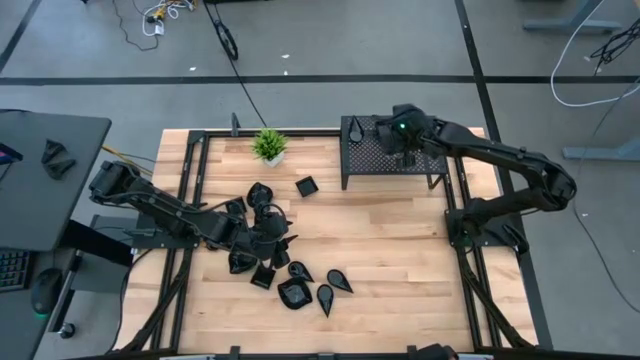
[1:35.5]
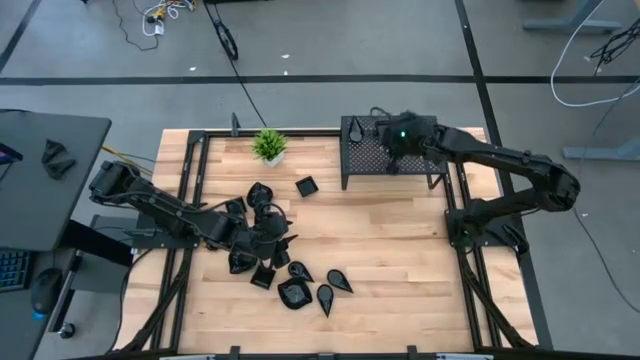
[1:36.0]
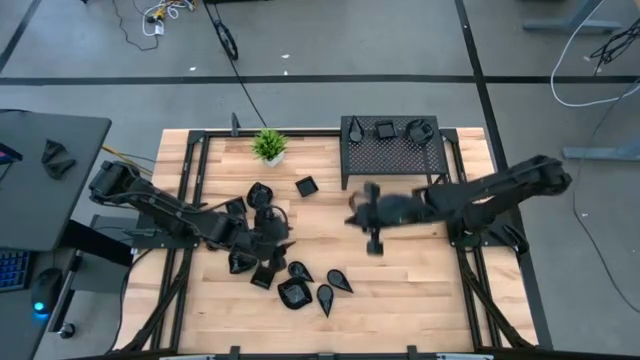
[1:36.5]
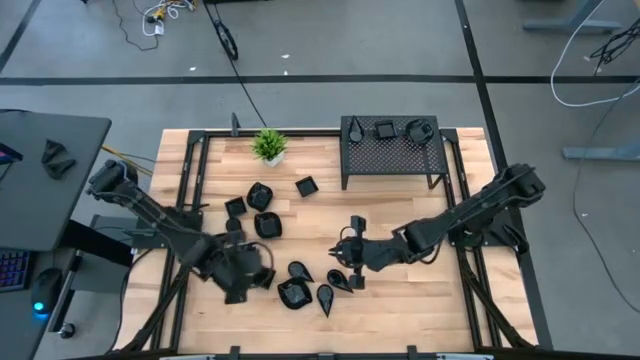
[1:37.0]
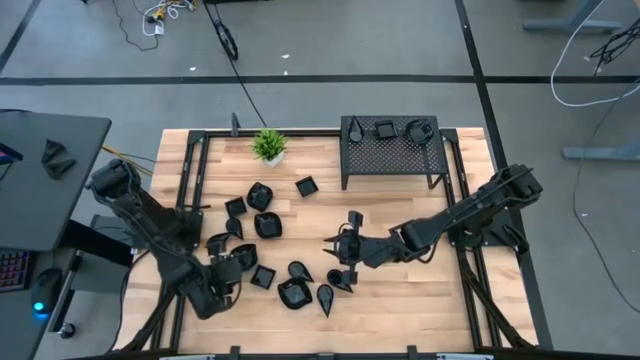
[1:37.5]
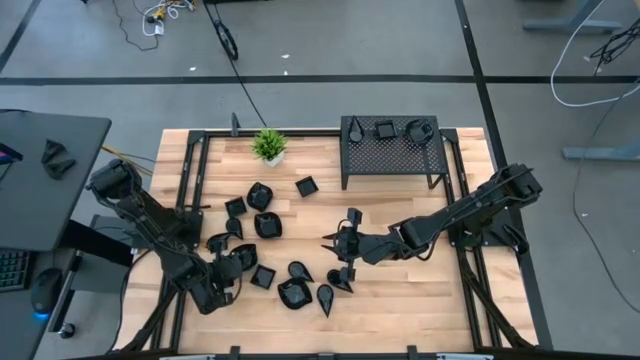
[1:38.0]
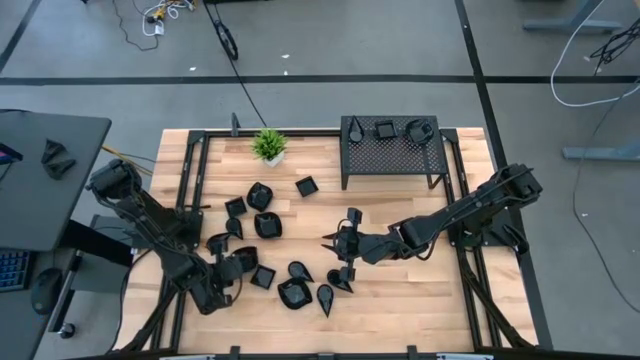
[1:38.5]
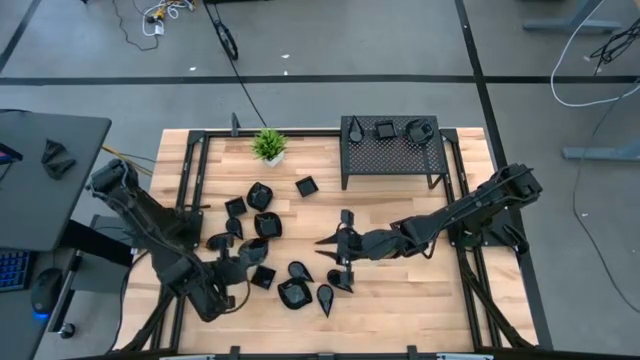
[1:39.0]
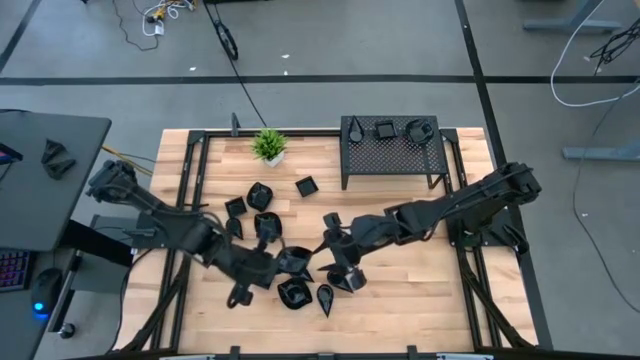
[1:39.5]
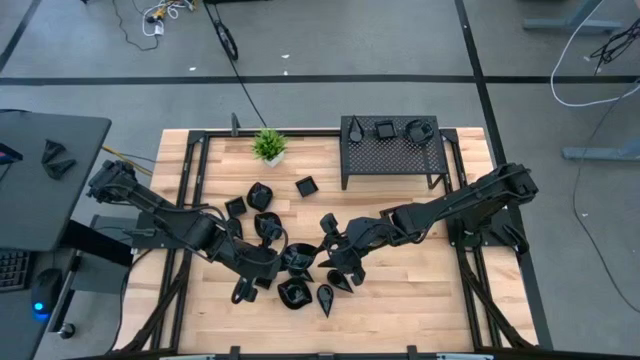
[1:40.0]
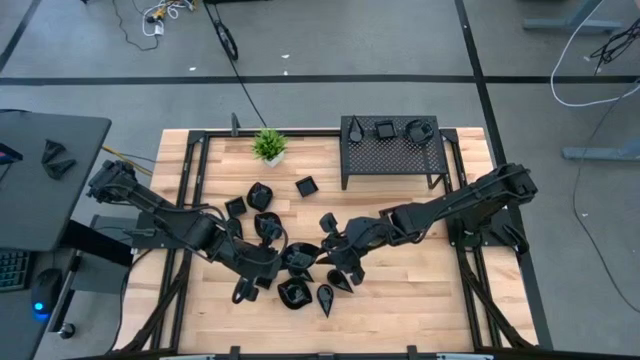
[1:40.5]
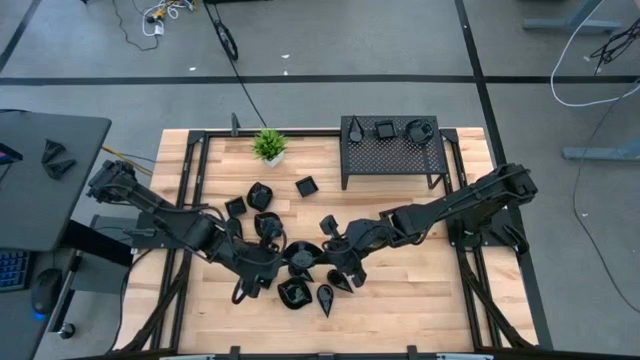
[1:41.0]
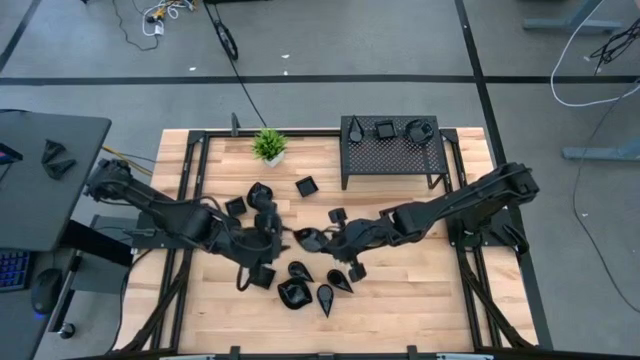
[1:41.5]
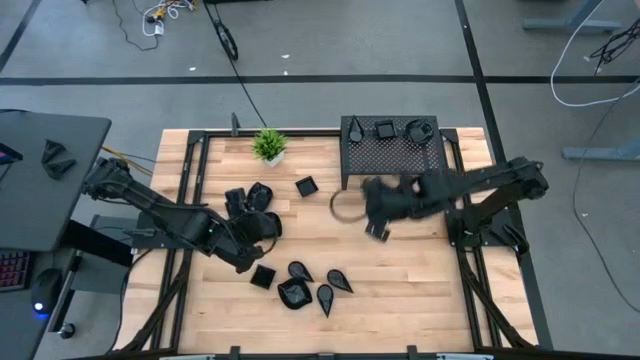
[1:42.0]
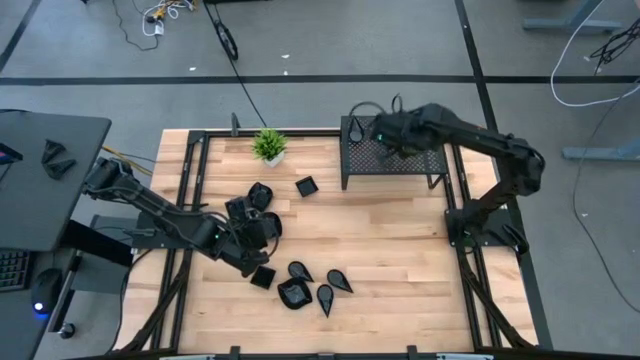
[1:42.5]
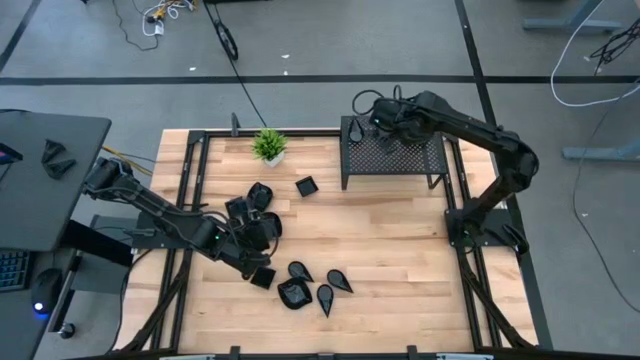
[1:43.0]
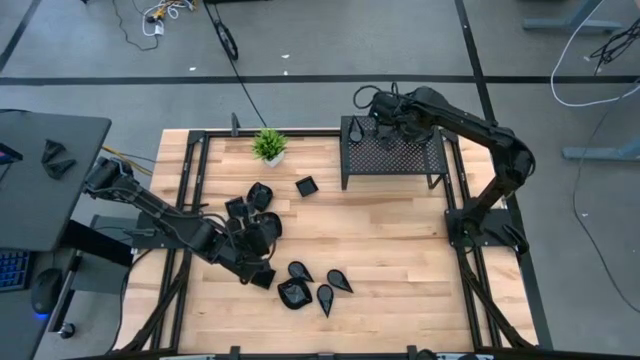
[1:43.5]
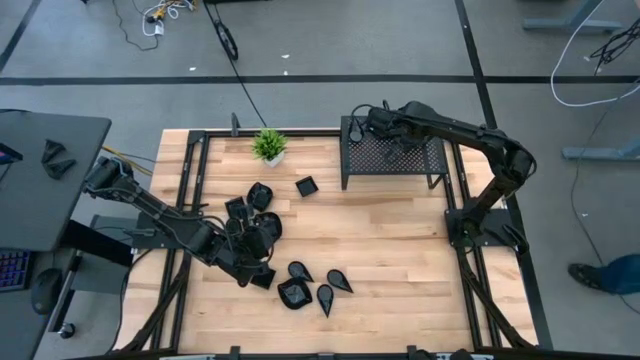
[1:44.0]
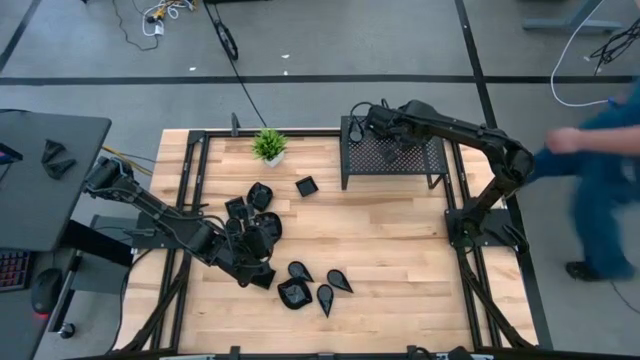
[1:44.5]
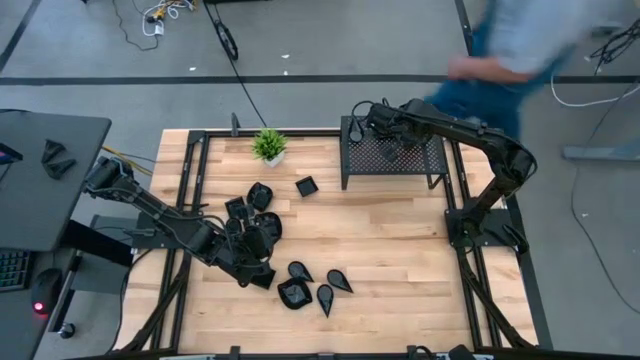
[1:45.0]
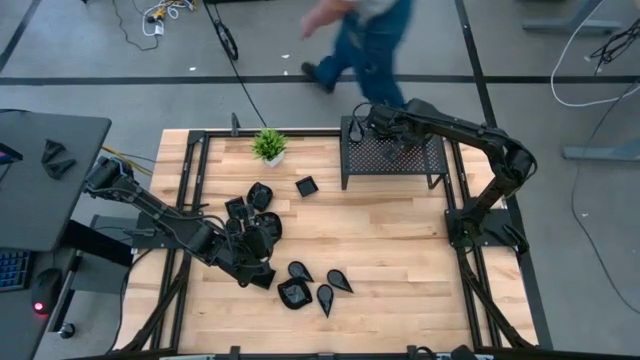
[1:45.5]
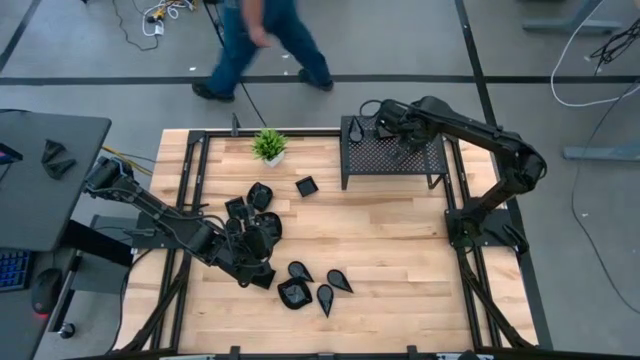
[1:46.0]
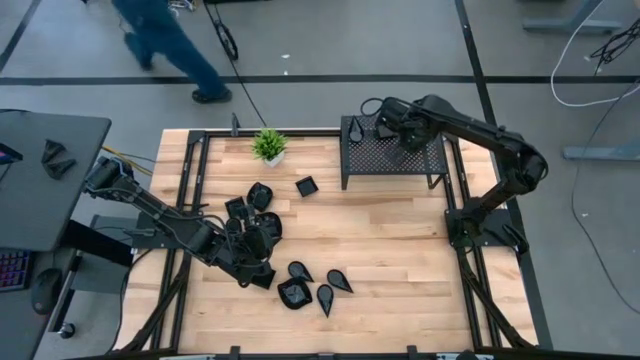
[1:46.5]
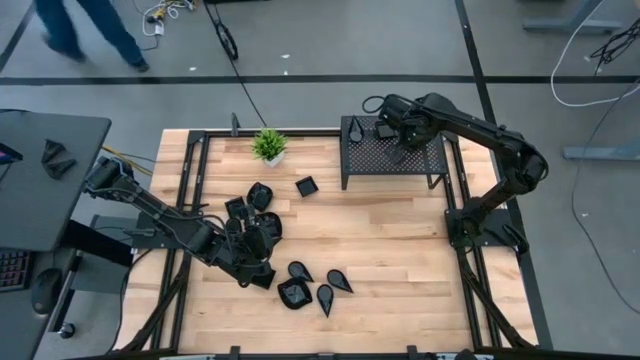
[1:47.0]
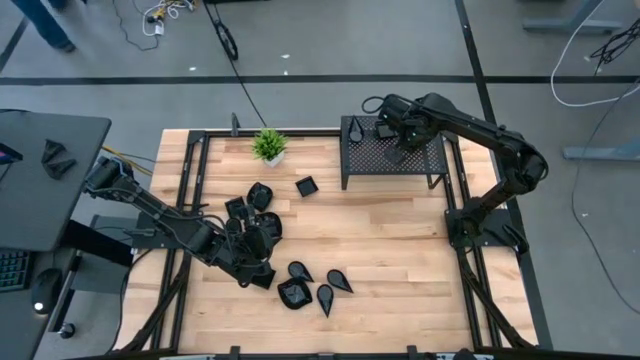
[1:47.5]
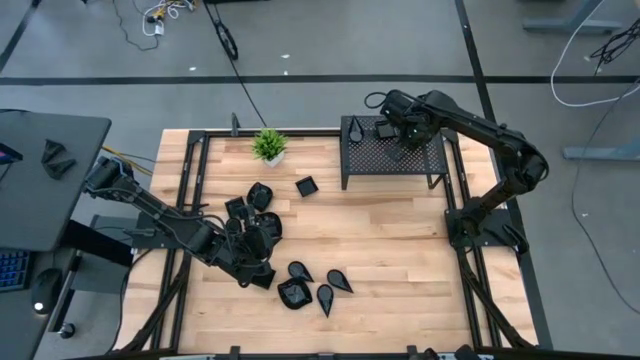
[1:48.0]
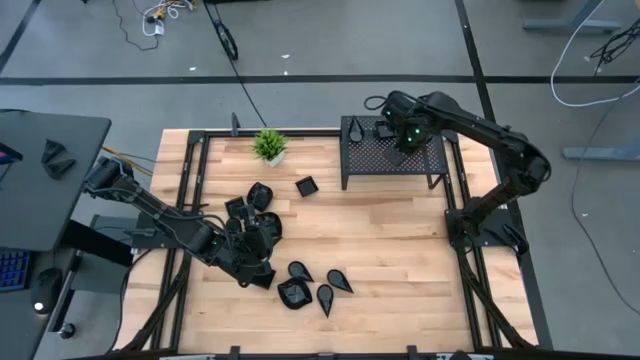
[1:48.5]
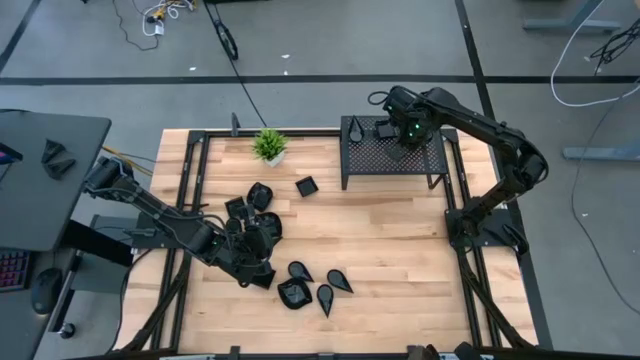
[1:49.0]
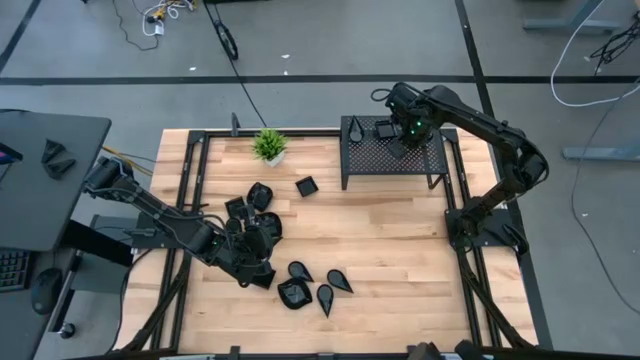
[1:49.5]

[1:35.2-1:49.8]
Task: Pick & Place Mini shaped plates
Stack the black leaf-shaped plate on top of the black leaf-shaped plate on the shelf

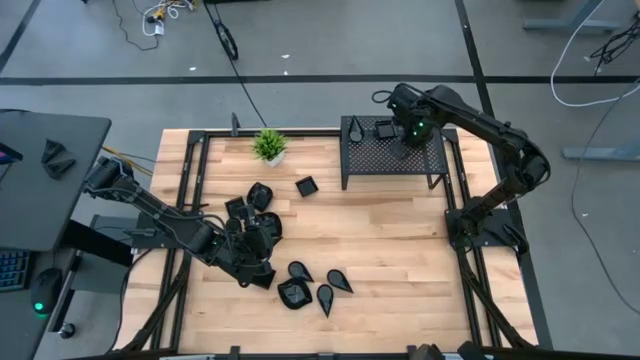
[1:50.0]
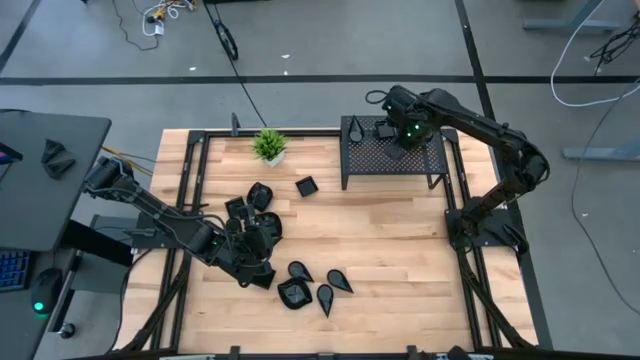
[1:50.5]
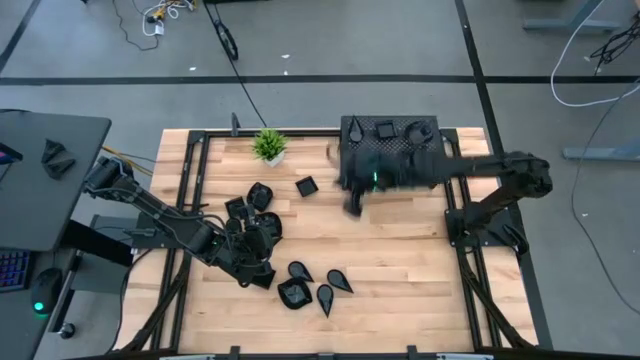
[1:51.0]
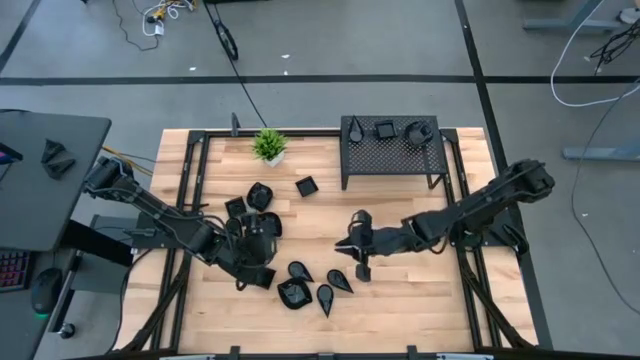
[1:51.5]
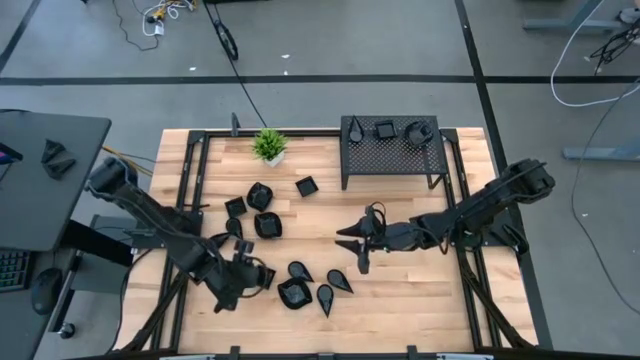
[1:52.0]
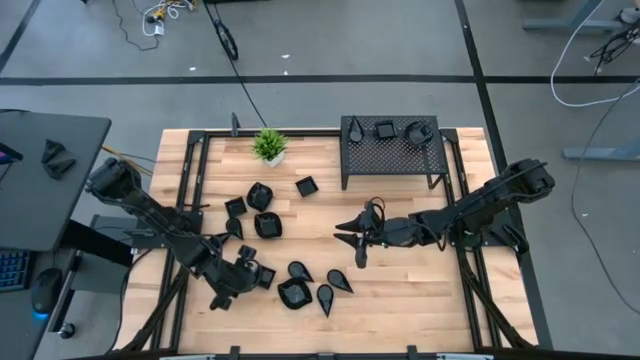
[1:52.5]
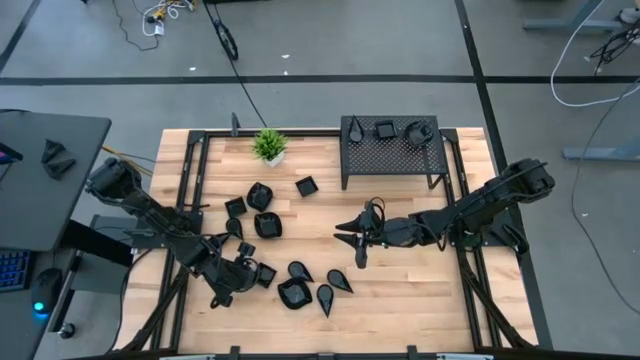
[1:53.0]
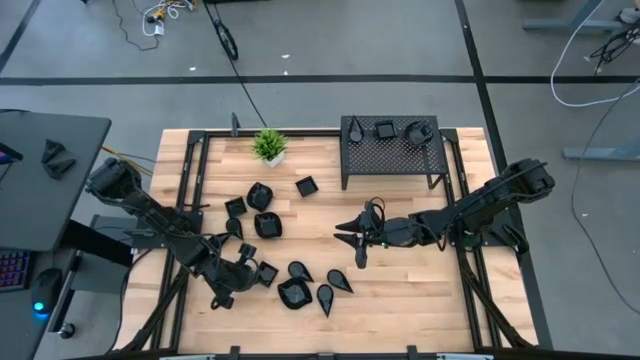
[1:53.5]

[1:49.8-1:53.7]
Stack the black square plate on top of the black square plate on the shelf

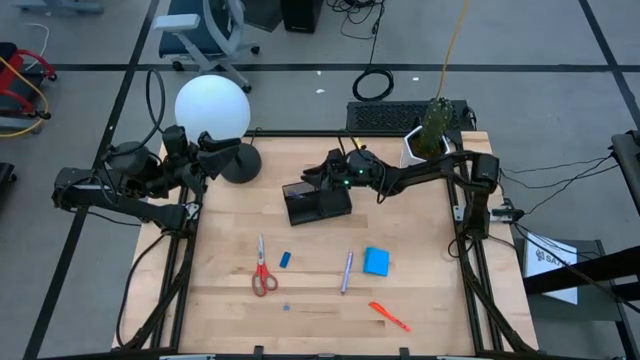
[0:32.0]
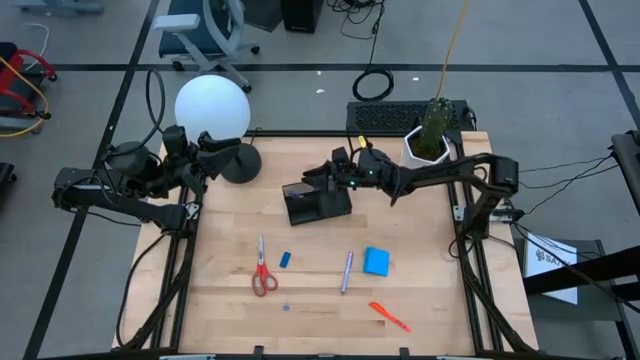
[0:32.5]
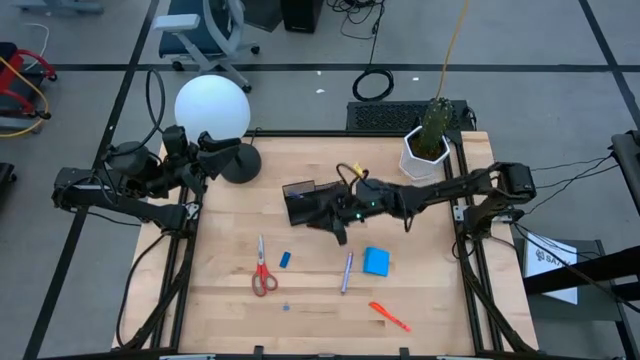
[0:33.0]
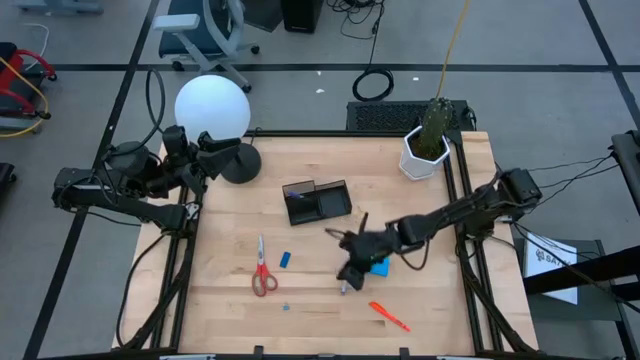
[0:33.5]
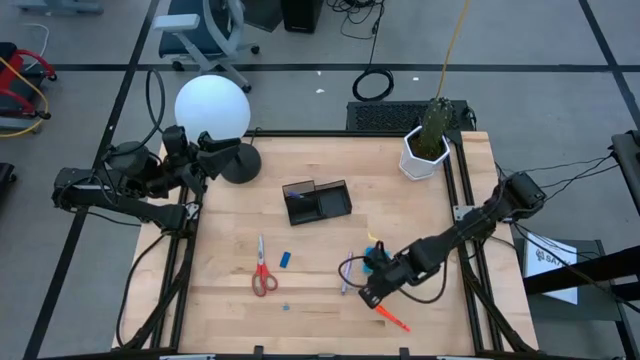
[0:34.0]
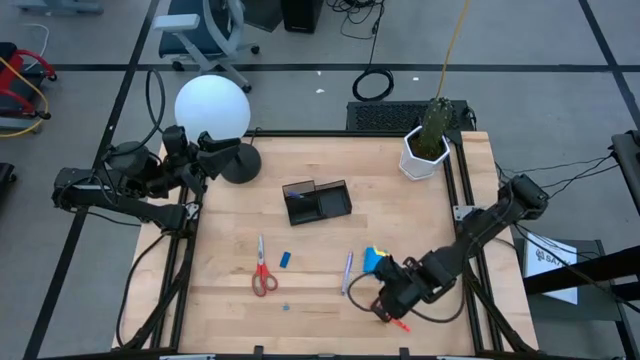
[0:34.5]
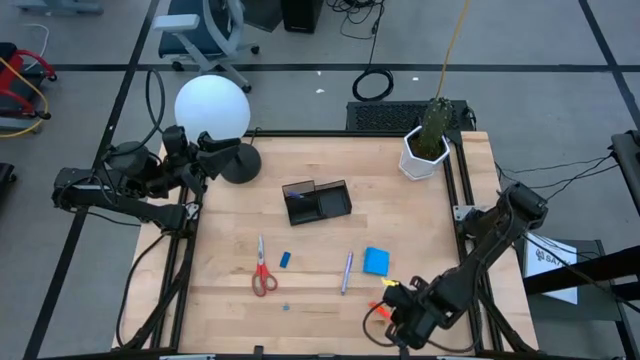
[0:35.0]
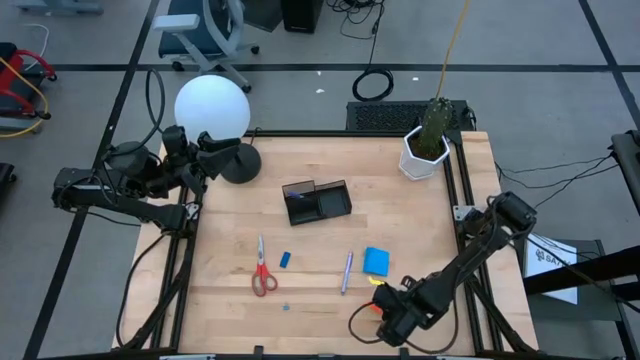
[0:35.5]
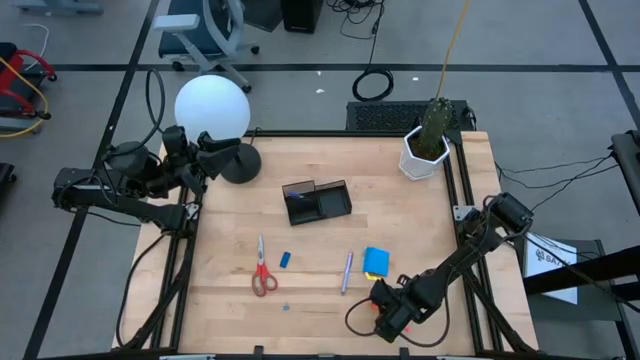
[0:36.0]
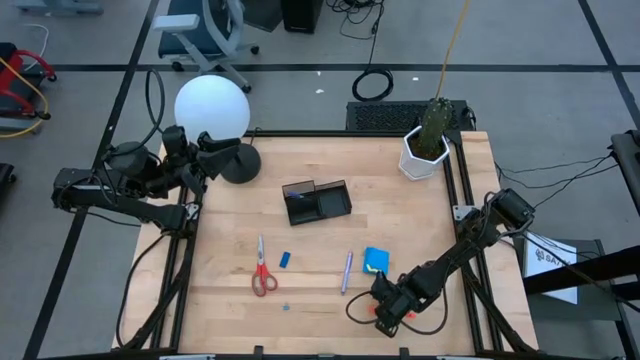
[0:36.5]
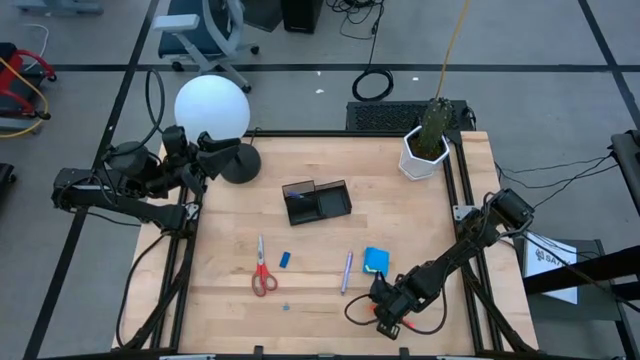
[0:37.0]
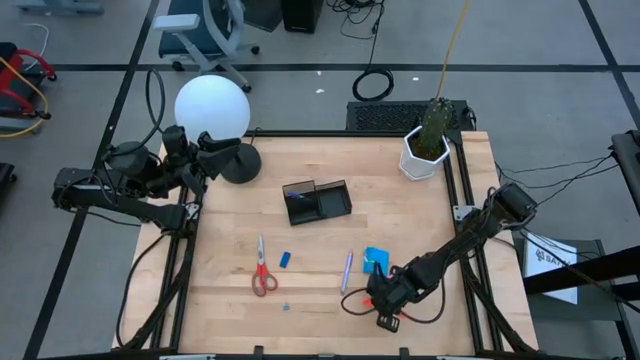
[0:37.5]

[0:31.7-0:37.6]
Task: Pick and place office supplies into organizer
Put the orange pen into the black desk organizer
